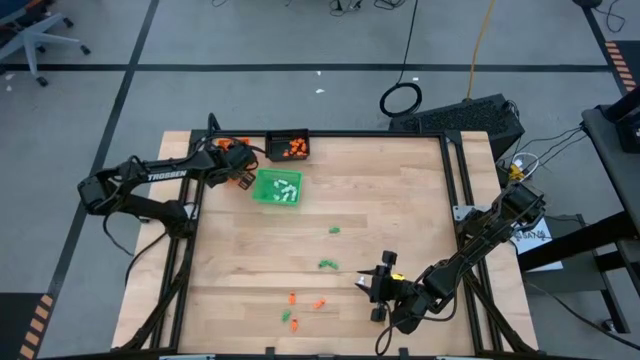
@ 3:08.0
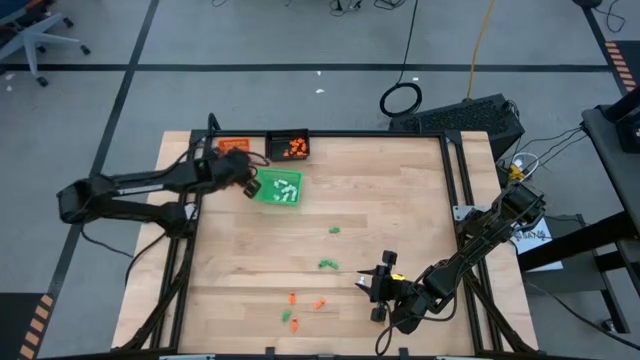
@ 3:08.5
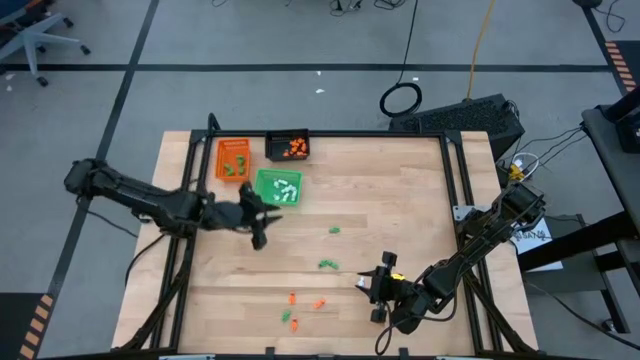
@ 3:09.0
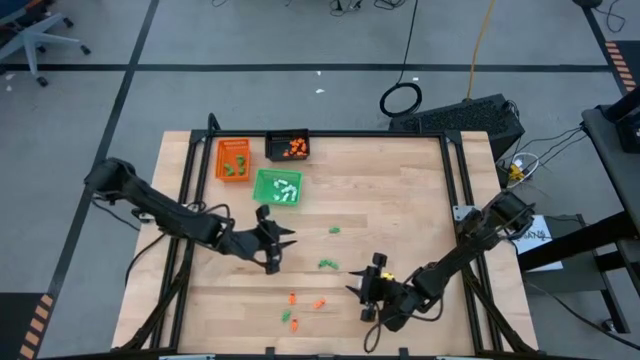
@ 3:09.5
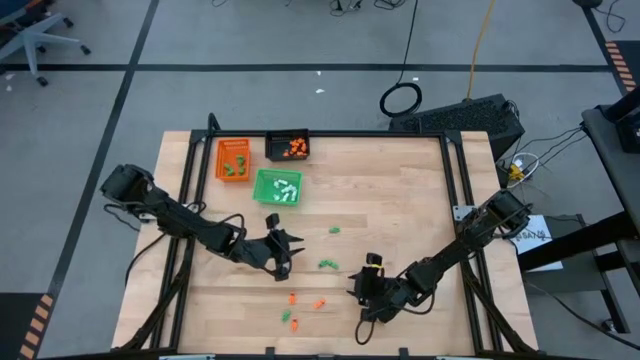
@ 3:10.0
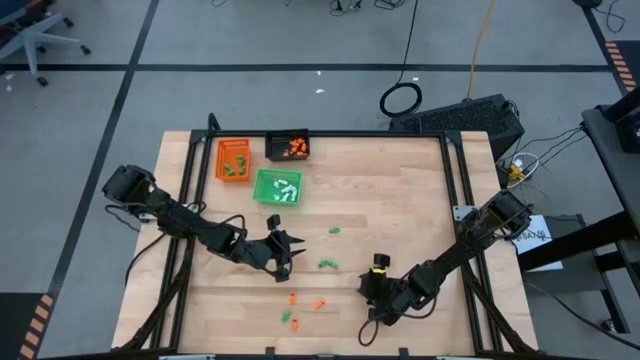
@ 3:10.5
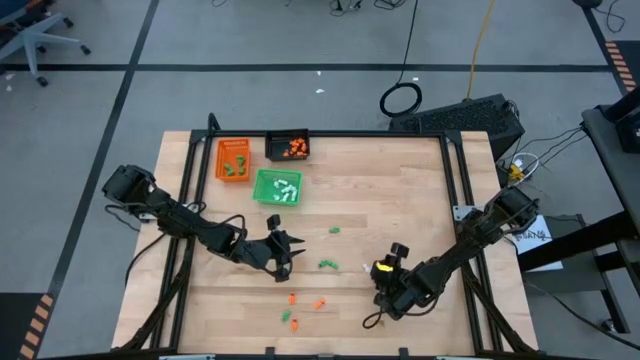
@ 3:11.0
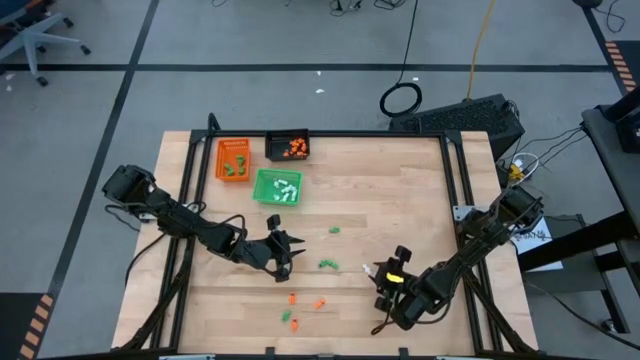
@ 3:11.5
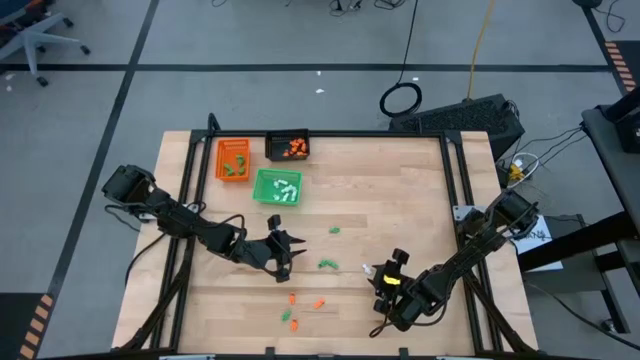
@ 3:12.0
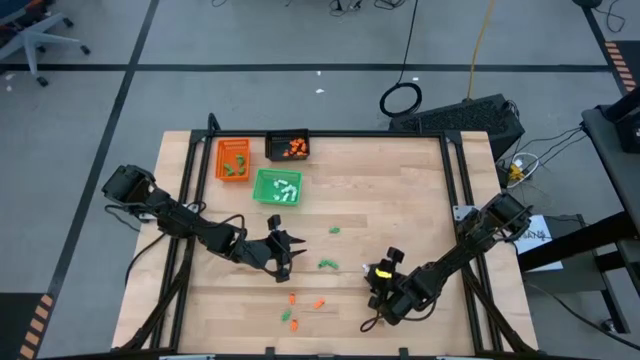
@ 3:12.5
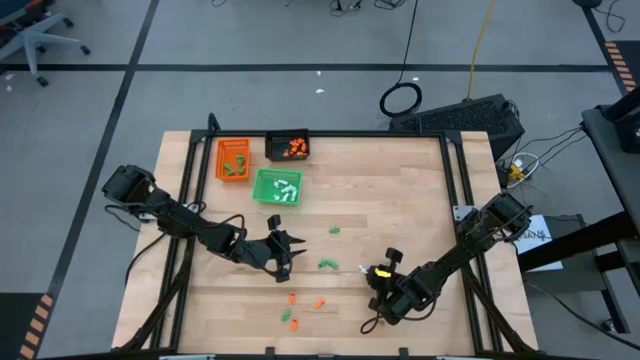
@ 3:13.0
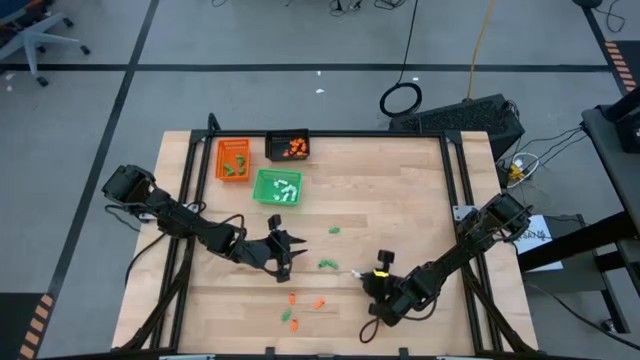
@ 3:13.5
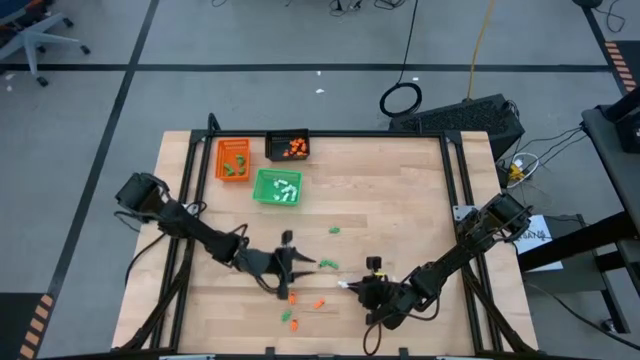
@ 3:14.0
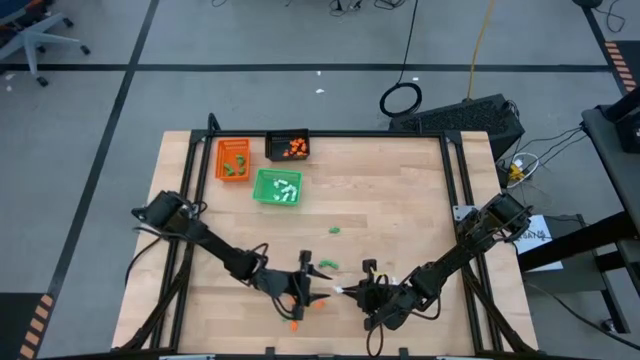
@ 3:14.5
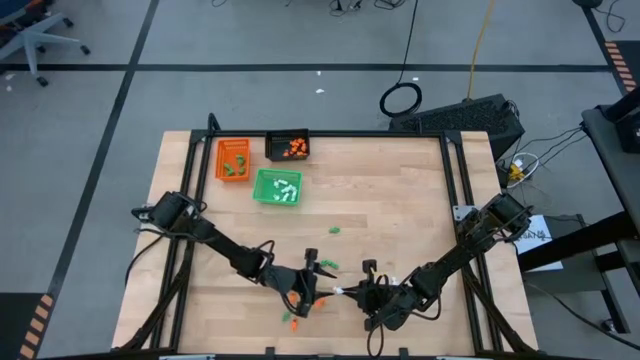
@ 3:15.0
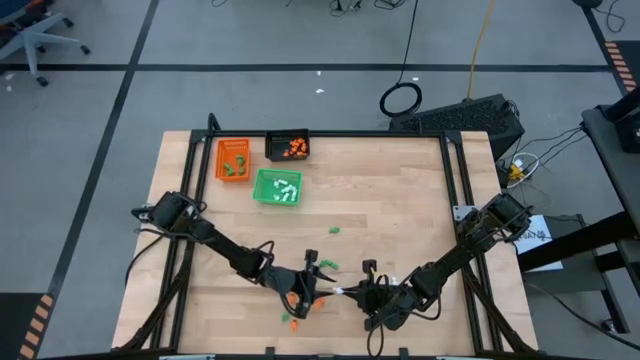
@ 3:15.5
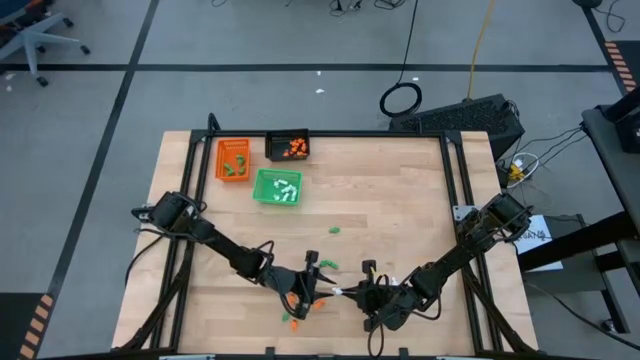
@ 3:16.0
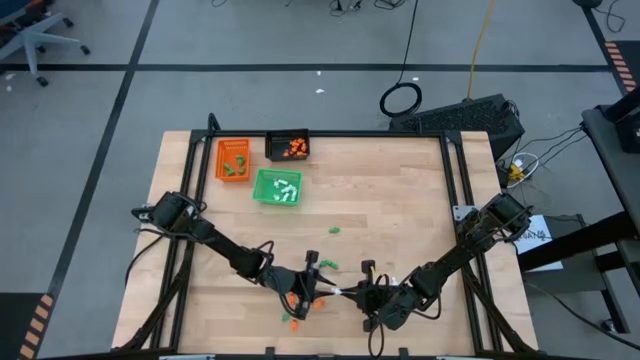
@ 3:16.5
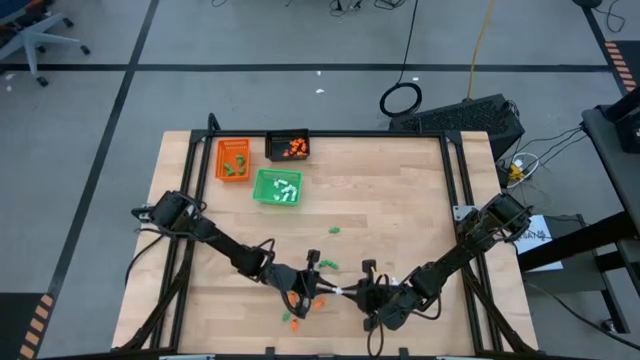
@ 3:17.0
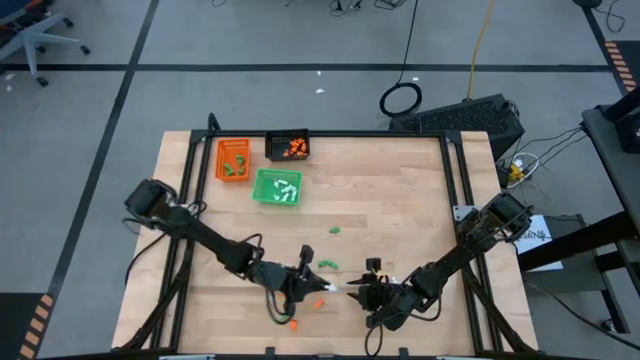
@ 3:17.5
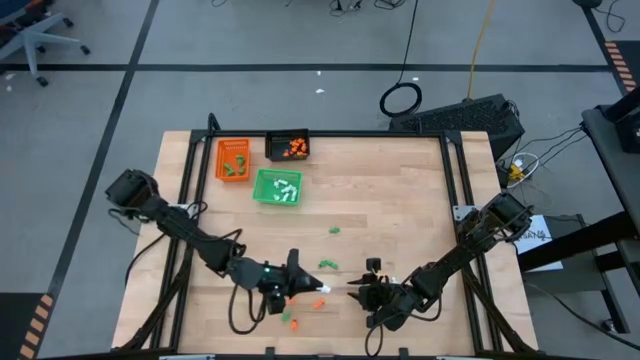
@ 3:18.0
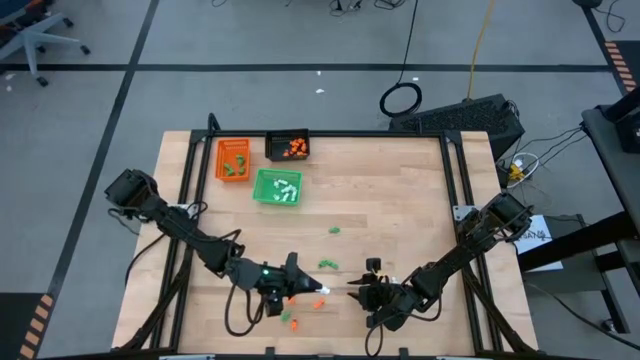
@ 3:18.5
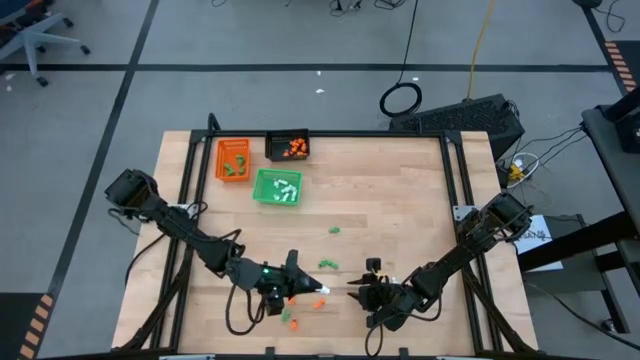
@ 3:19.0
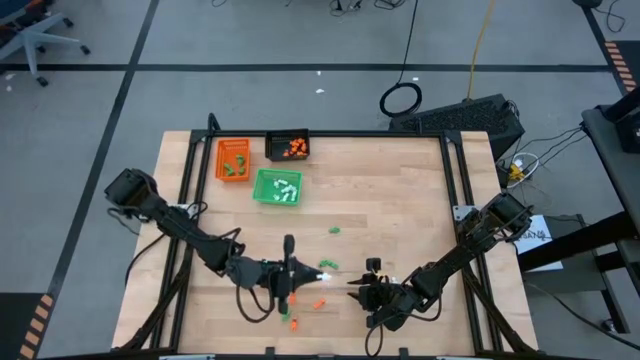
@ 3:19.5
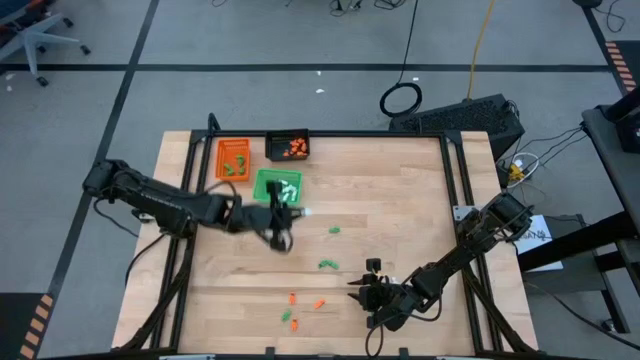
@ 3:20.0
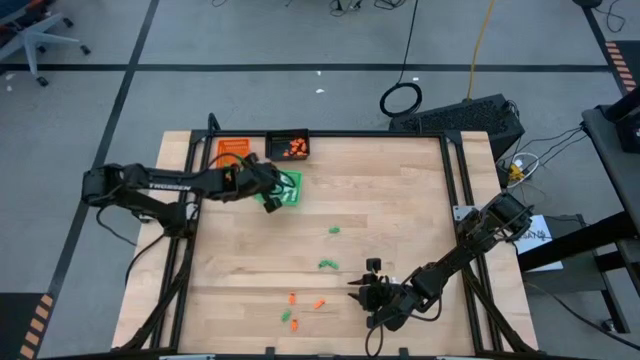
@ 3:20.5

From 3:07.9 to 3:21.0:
Task: Sort Halloween decoration
Put the white skeleton toy into the green bin

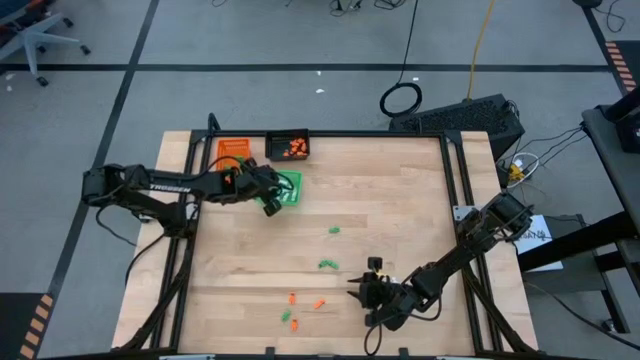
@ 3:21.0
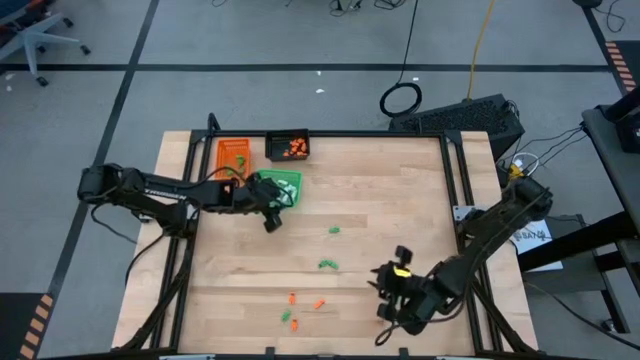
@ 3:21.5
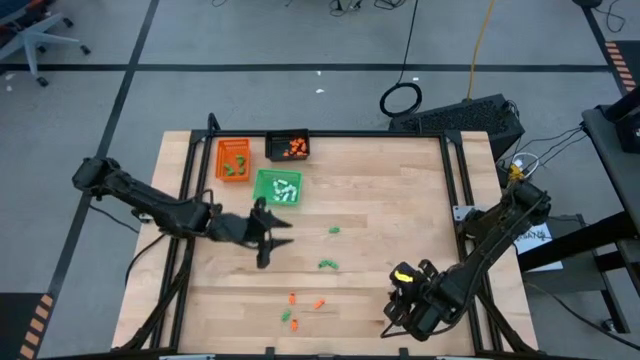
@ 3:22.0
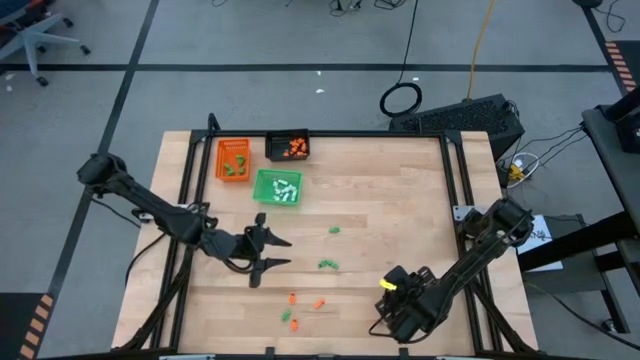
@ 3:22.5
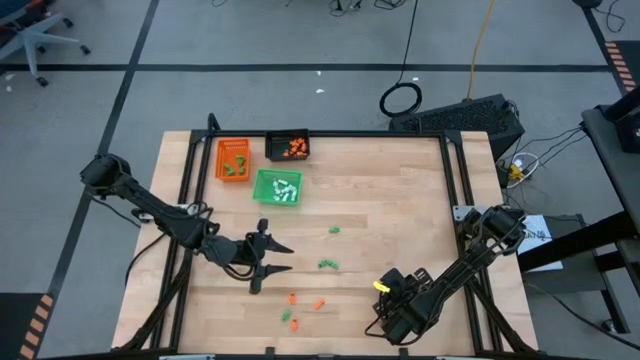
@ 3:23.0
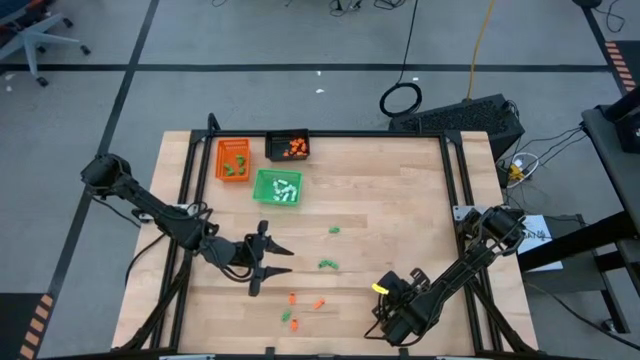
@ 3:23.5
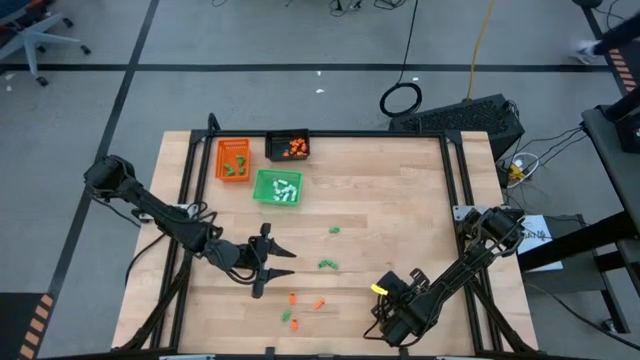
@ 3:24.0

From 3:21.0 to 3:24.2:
Put the white skeleton toy into the green bin

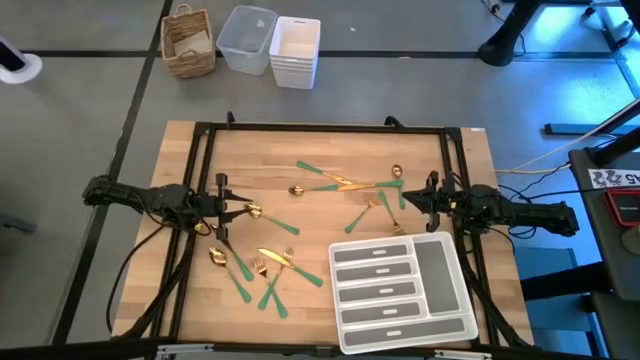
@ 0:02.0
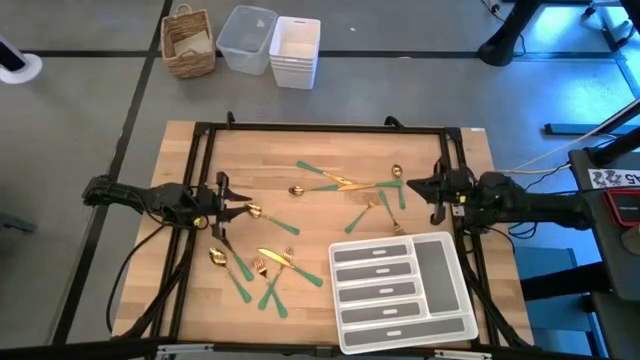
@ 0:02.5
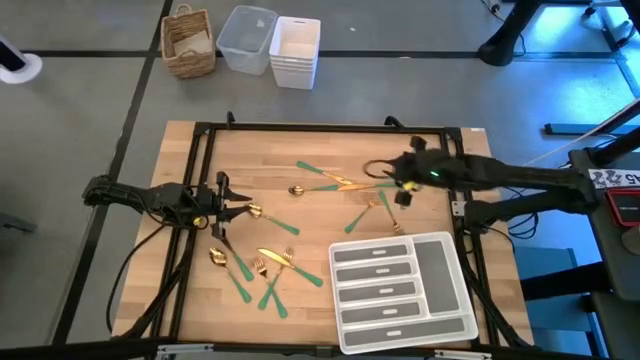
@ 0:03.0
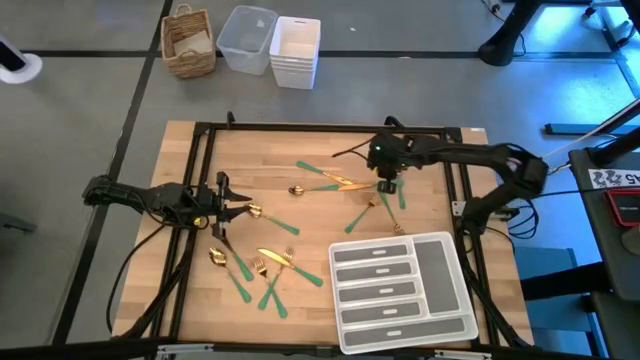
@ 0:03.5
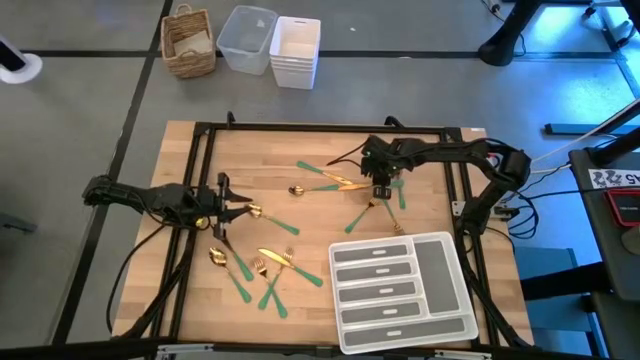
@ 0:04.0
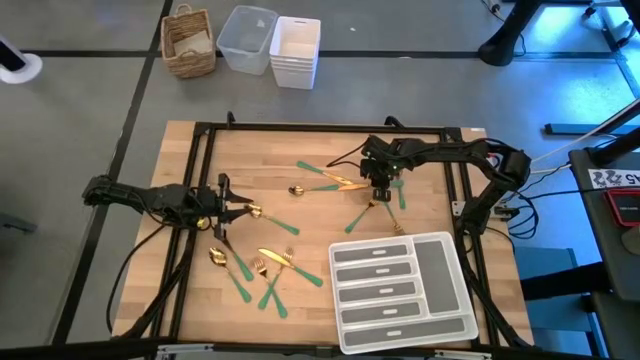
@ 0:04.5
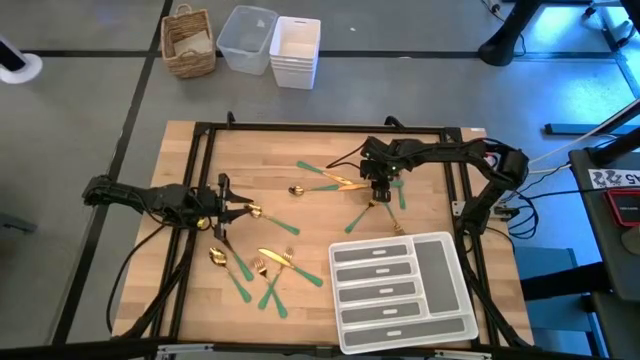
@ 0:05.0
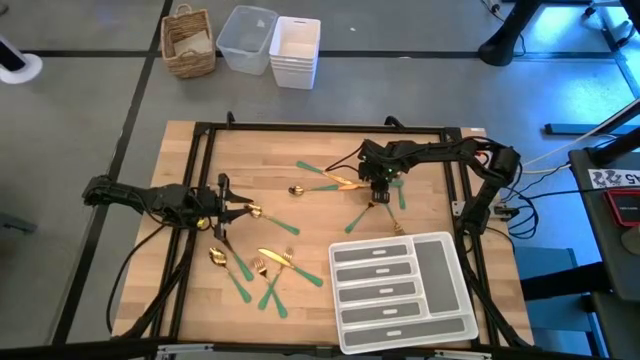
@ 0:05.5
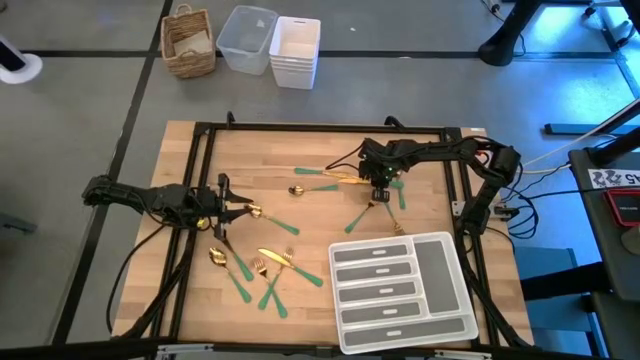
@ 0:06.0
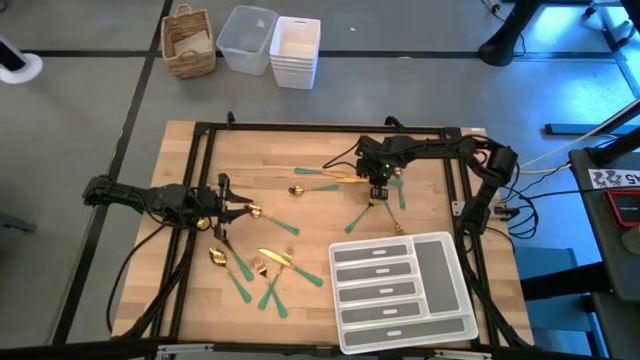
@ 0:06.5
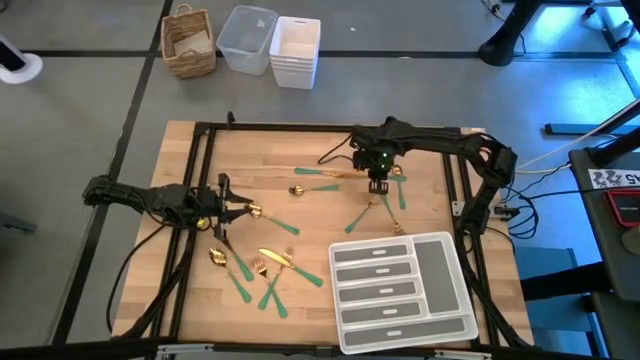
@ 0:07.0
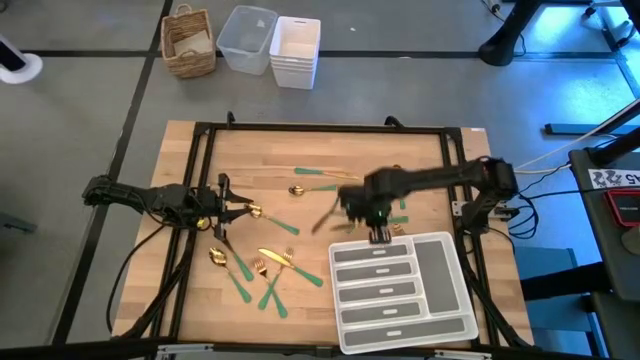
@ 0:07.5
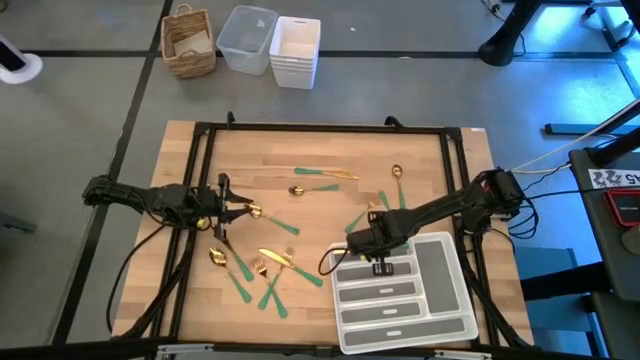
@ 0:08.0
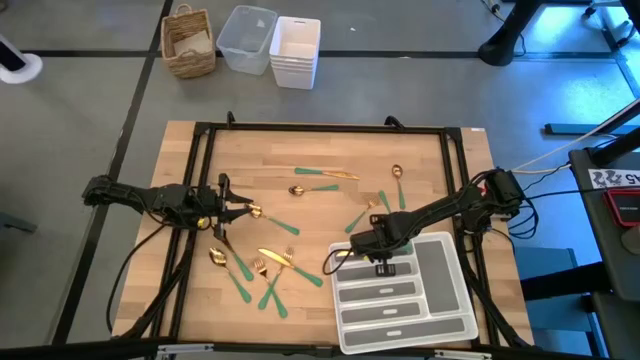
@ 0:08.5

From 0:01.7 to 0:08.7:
Task: Sort silverware
Put the top right green table knife into the silverware tray
